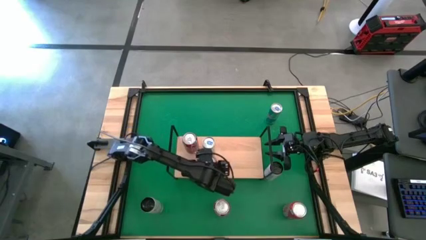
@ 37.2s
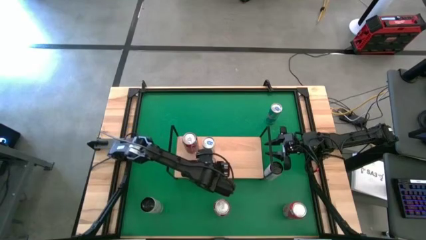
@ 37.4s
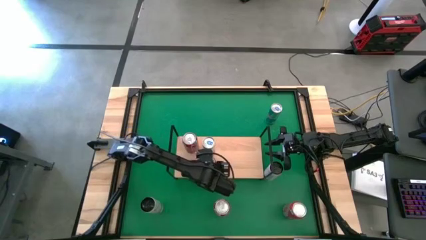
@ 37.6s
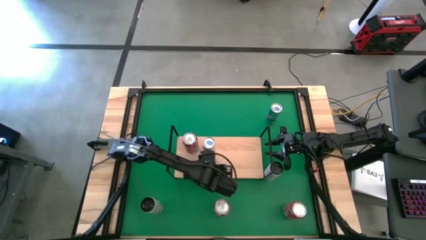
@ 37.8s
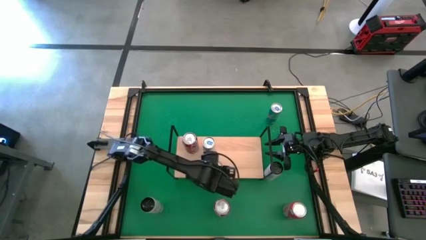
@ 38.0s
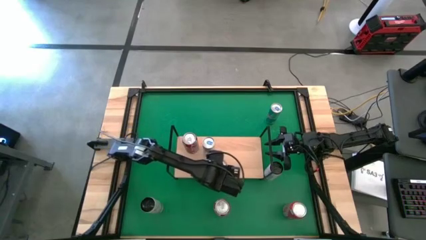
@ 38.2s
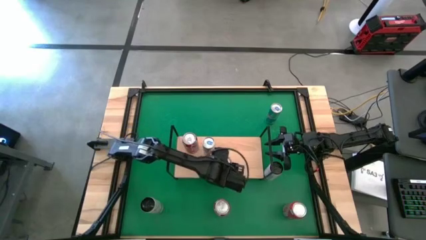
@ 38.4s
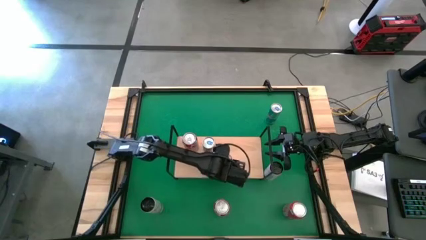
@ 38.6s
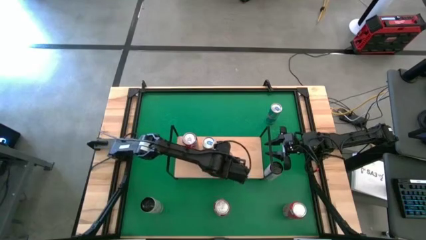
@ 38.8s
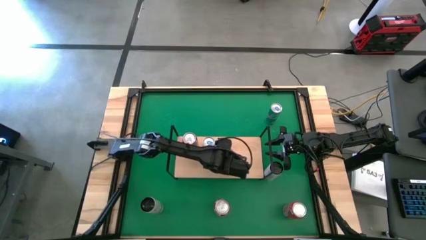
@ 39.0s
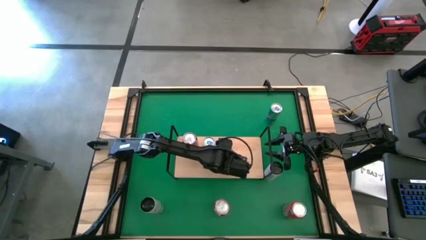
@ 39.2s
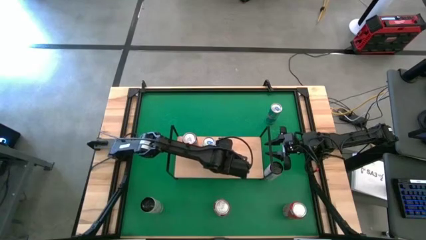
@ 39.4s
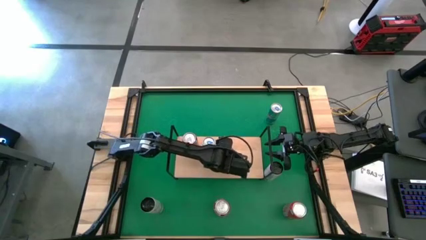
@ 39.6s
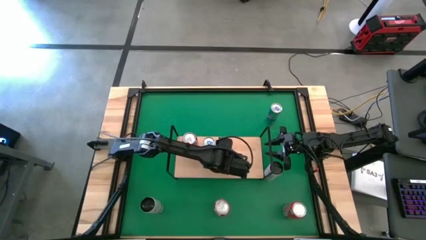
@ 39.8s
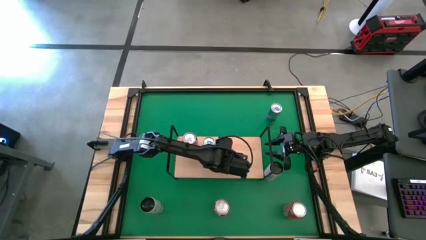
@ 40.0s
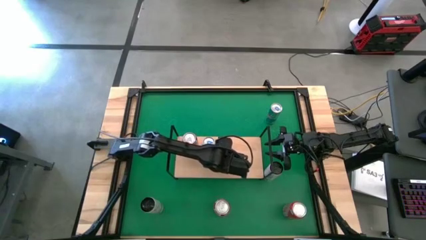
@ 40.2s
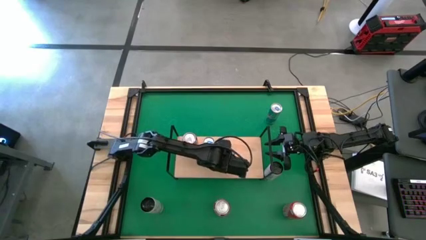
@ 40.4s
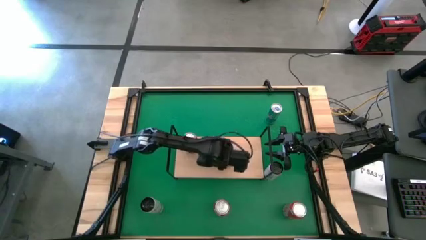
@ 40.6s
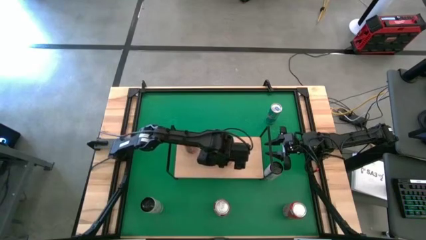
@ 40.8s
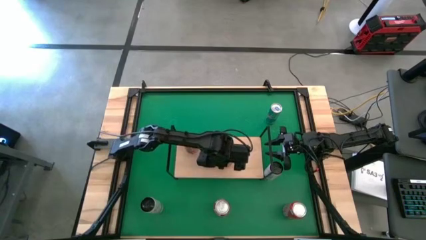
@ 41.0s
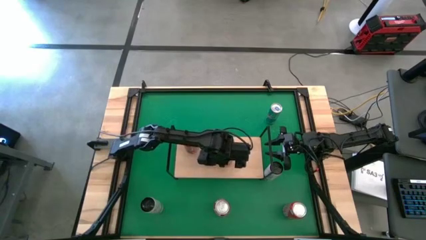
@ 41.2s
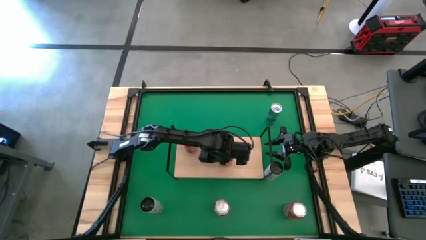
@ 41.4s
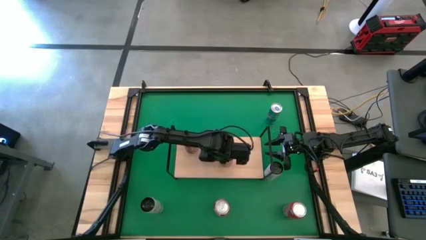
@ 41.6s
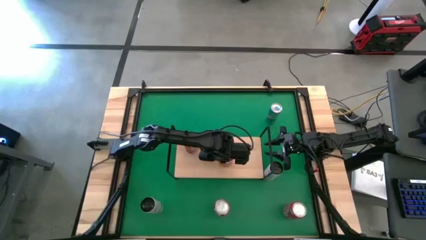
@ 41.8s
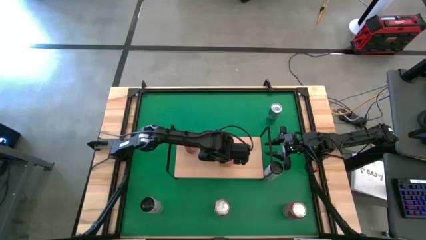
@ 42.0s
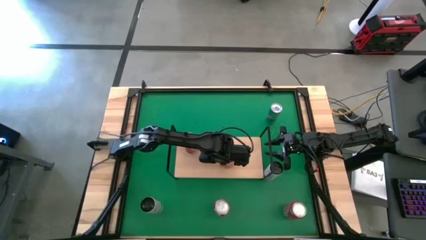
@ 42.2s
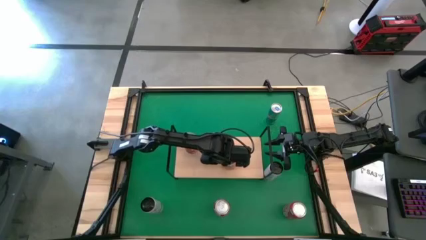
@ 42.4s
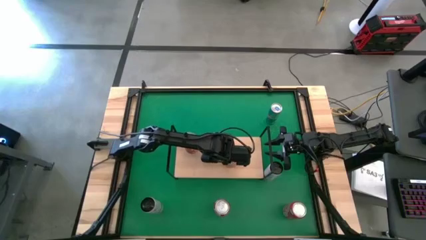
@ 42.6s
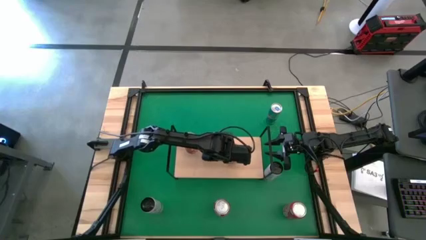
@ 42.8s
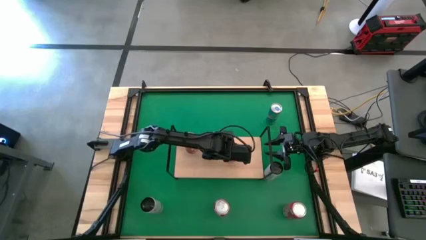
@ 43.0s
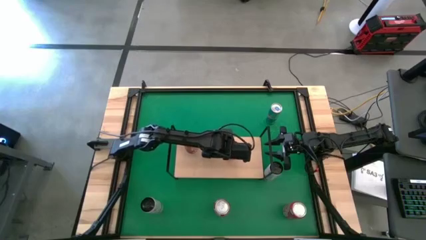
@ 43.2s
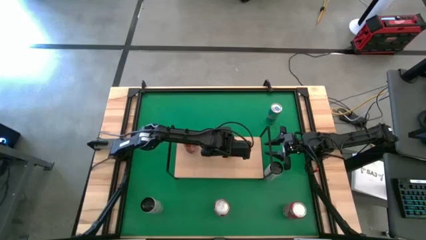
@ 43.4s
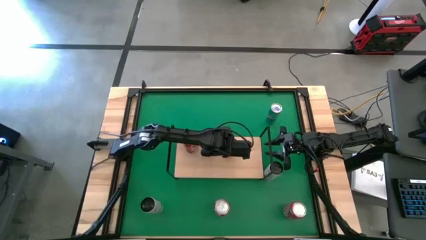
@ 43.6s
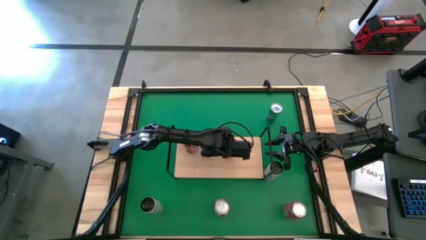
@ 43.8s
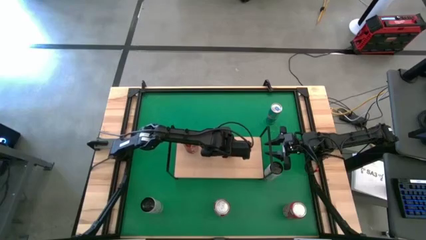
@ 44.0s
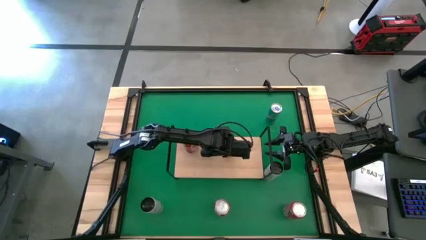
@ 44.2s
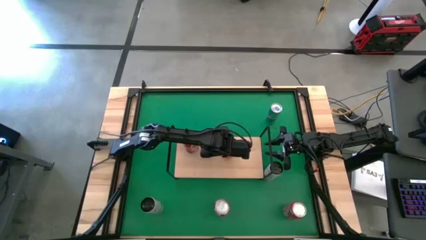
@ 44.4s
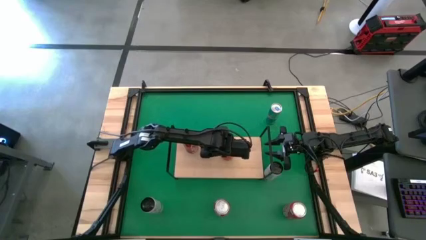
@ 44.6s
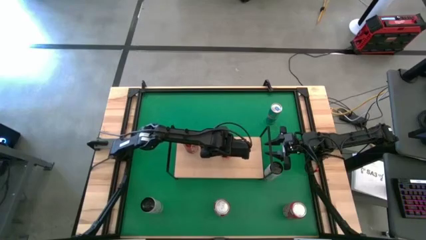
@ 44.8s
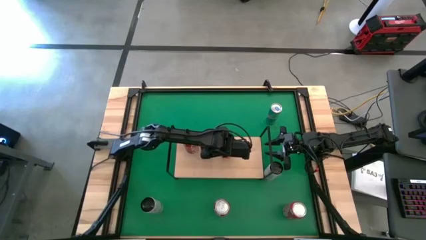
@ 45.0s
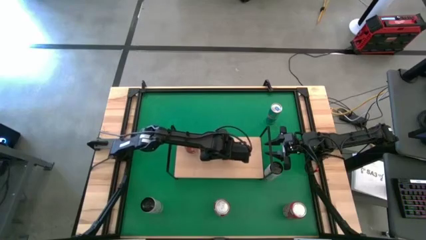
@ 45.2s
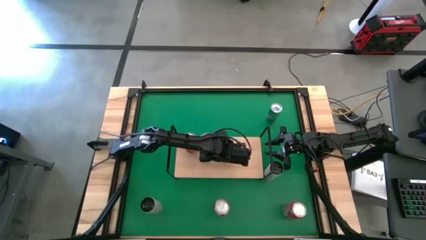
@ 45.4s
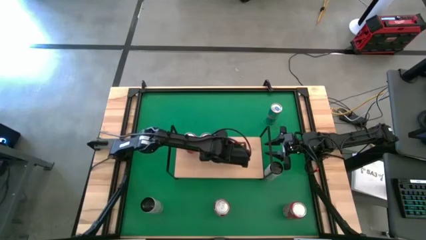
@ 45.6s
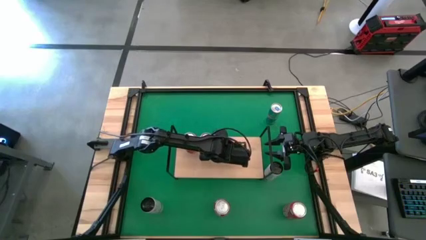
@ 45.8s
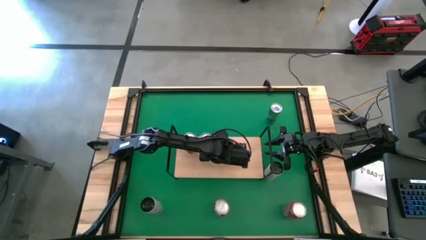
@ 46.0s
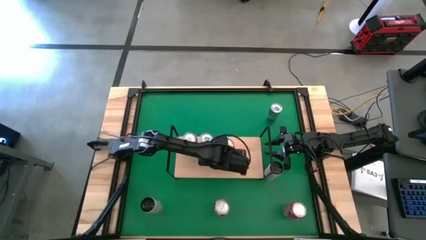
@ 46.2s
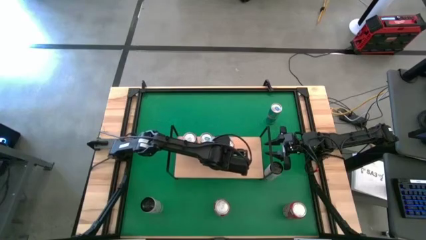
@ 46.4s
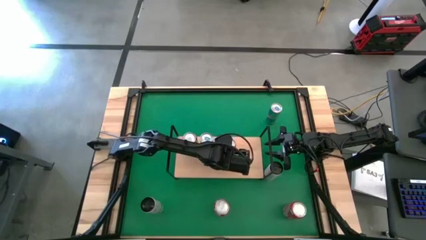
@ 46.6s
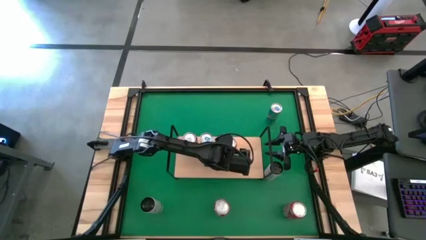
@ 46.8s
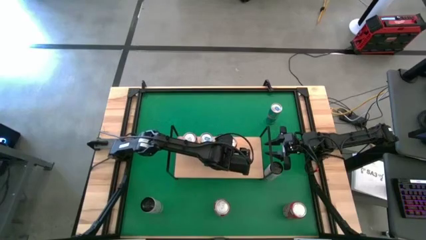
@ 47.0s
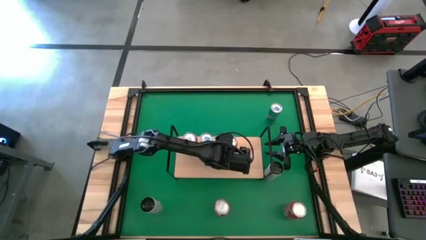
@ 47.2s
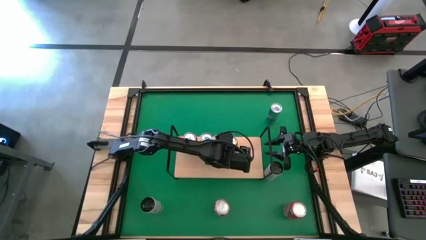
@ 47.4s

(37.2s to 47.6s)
Task: Place canned beverage on shelf
Put the top orange soda can on the shelf

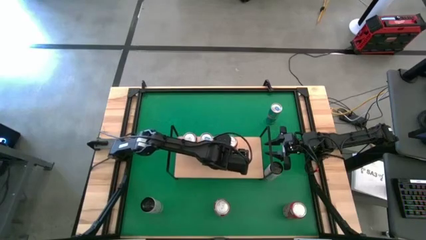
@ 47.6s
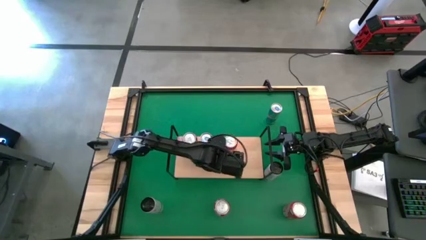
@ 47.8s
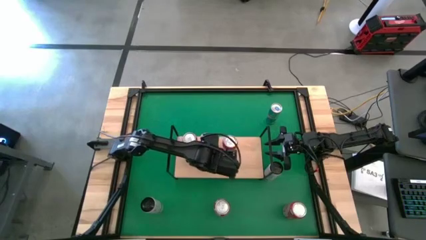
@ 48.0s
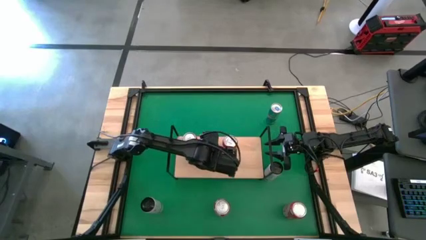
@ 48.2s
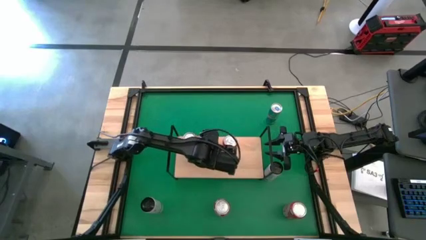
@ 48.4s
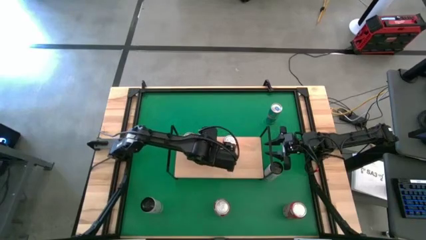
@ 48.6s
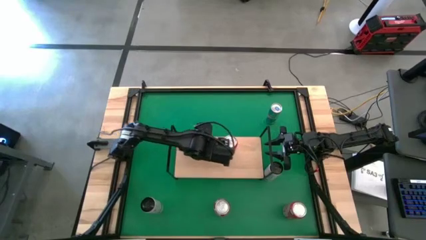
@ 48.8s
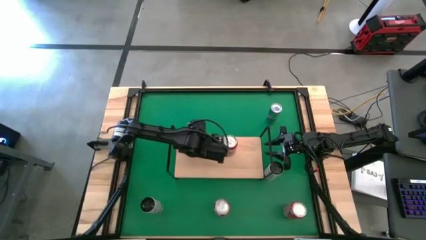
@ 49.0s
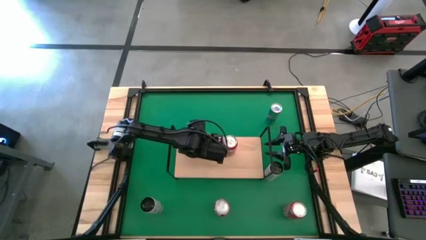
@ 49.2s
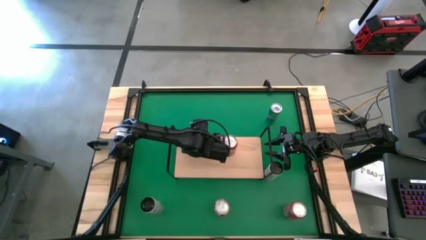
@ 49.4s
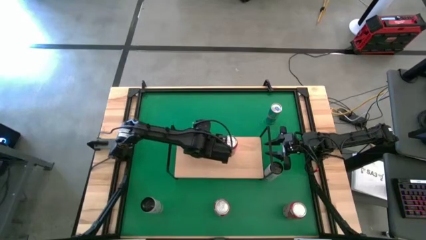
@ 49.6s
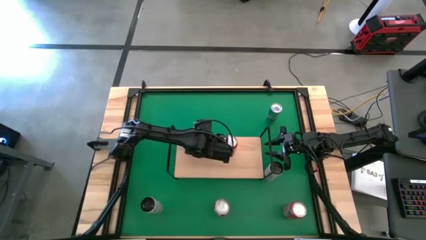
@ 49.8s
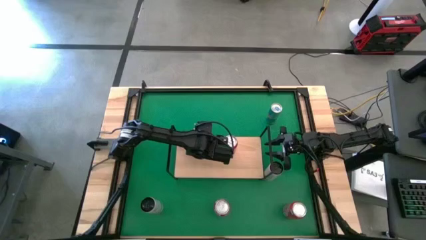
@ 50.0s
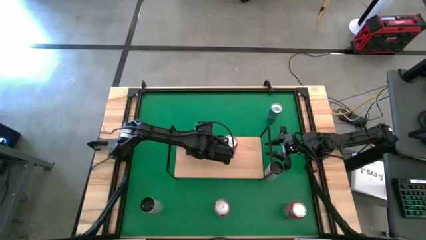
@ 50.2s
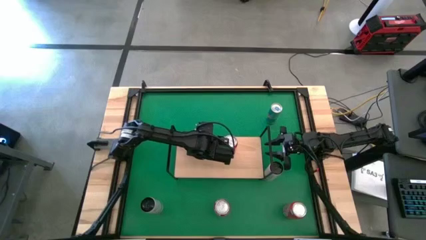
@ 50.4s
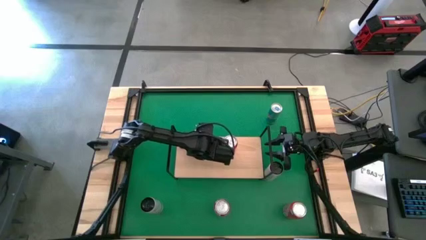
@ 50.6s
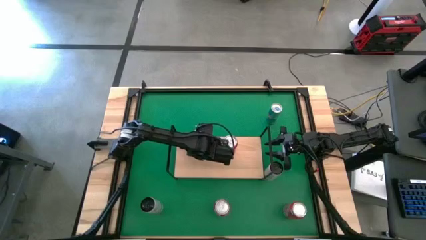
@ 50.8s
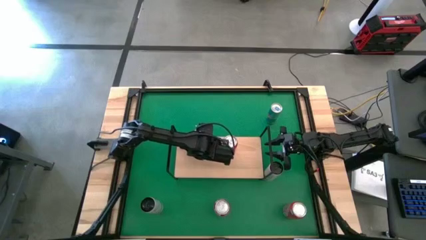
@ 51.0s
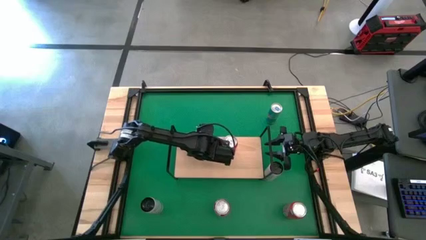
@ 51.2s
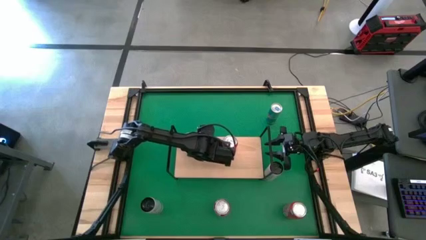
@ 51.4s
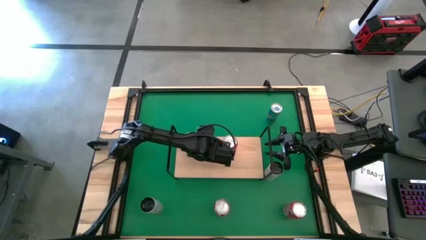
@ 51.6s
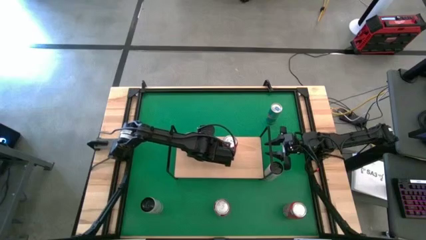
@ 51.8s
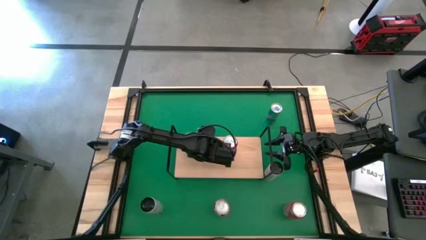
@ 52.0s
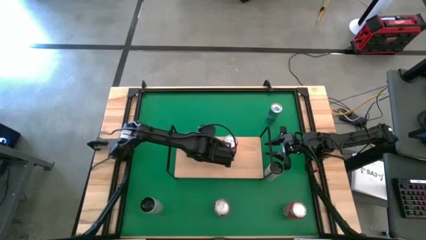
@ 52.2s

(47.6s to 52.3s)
Adjust the blue soda can on the shelf

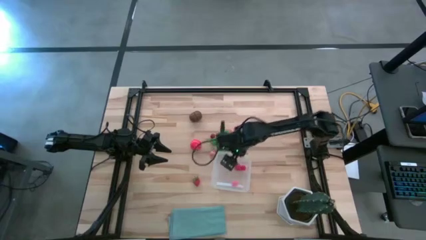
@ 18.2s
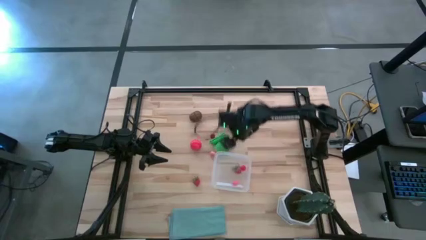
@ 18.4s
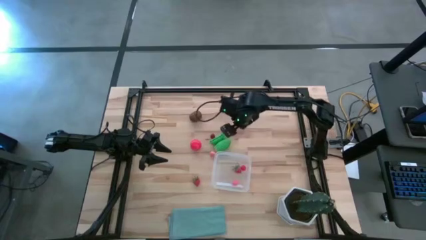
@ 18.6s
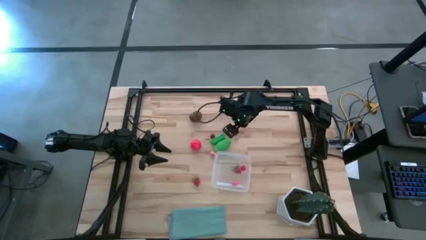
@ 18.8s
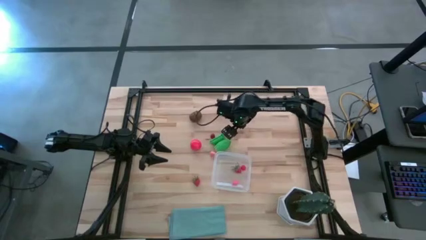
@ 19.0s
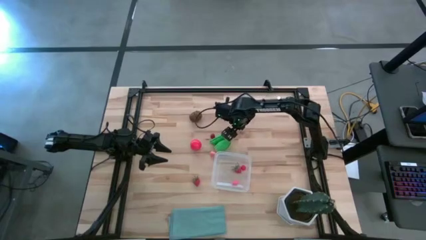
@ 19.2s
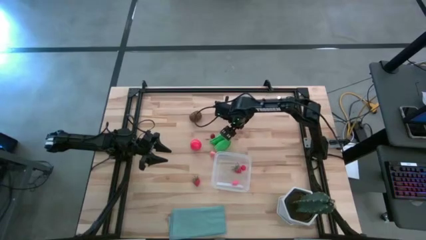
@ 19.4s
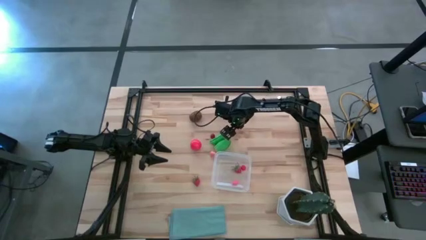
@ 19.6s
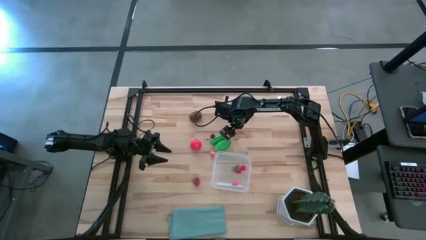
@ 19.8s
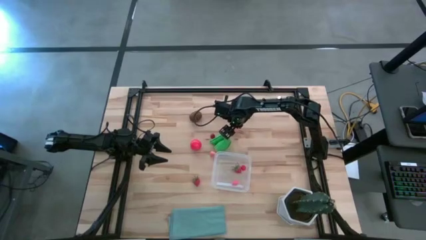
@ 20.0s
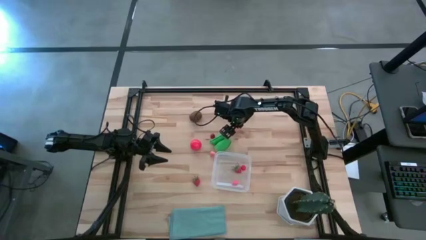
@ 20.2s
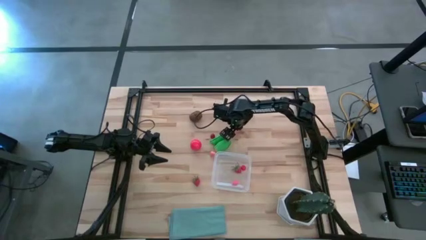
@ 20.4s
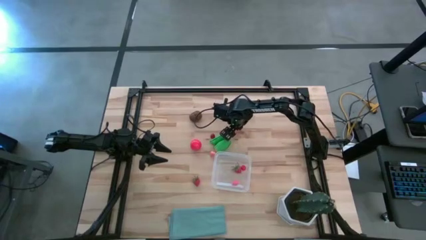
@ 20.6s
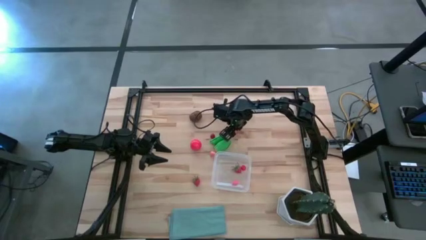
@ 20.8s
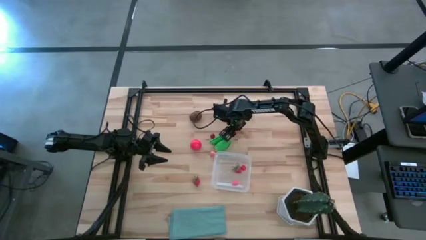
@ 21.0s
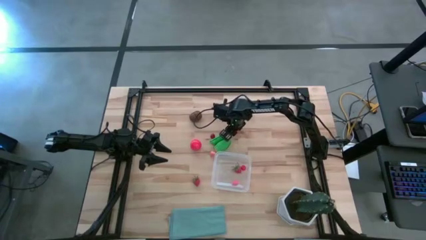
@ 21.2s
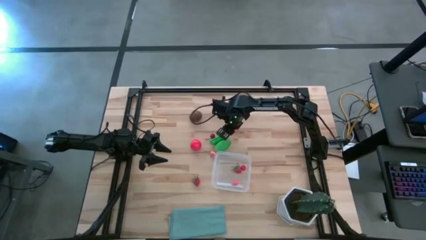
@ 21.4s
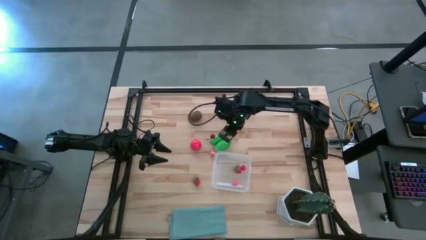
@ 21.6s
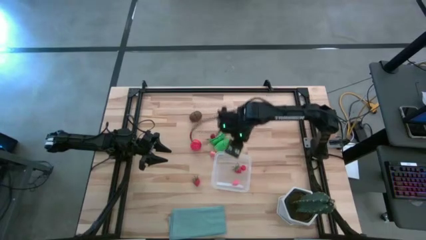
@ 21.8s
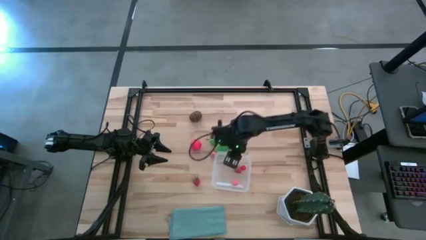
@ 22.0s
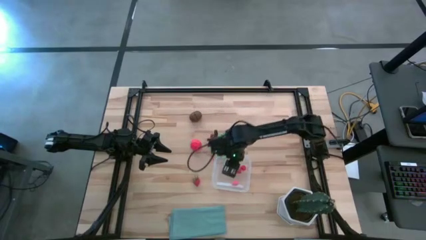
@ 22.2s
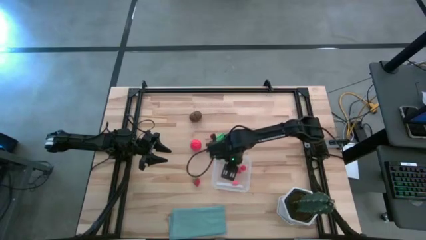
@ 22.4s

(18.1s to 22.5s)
Task: Pick and placing Produce into tupperware
Put the top peach into the transparent container
